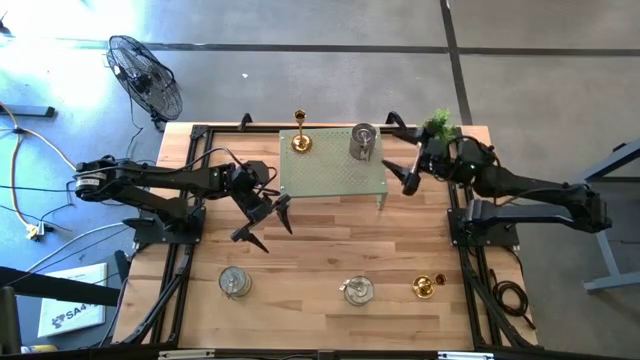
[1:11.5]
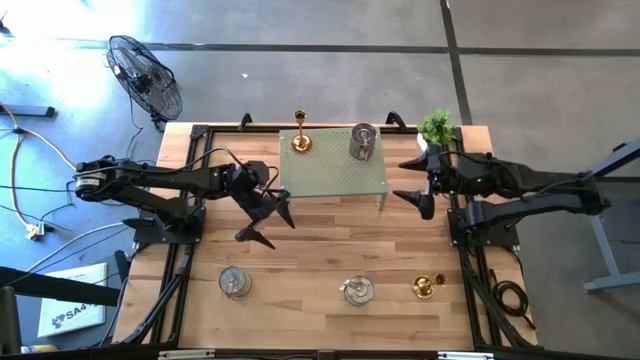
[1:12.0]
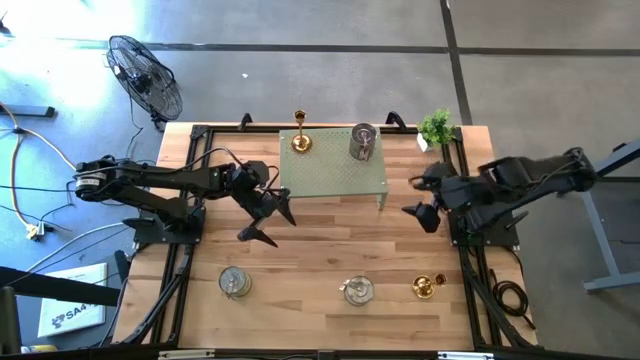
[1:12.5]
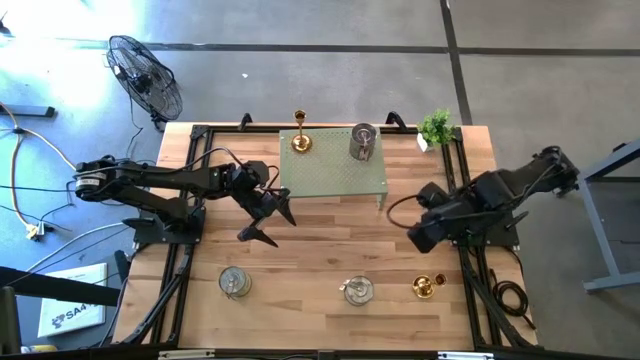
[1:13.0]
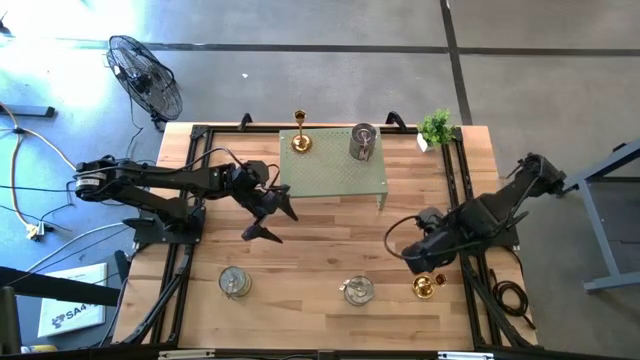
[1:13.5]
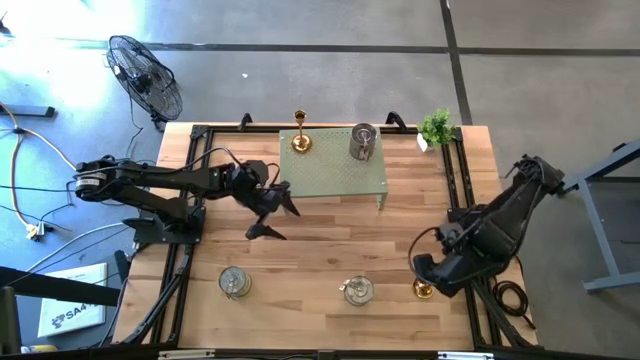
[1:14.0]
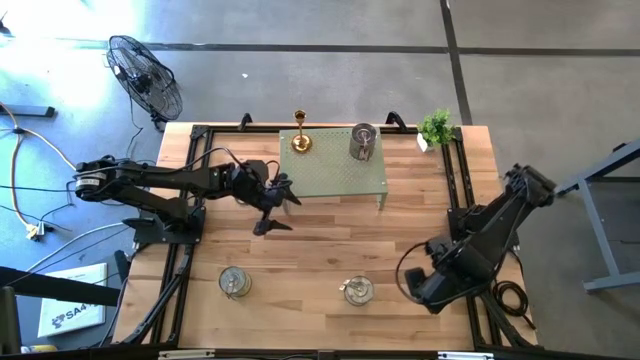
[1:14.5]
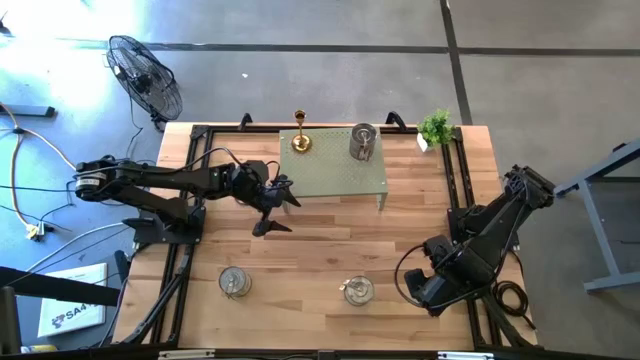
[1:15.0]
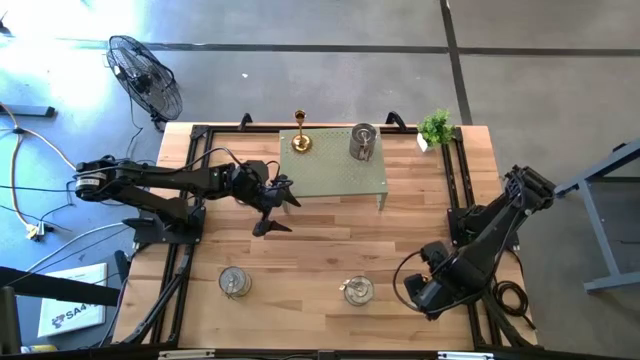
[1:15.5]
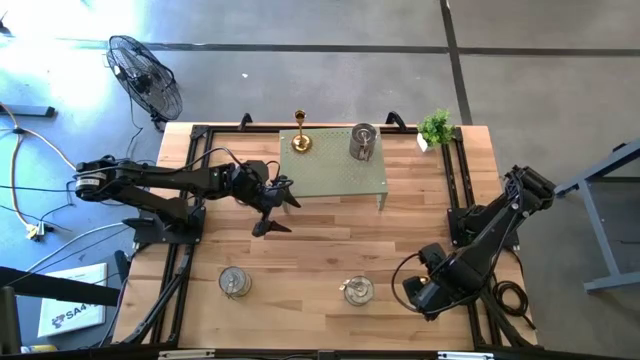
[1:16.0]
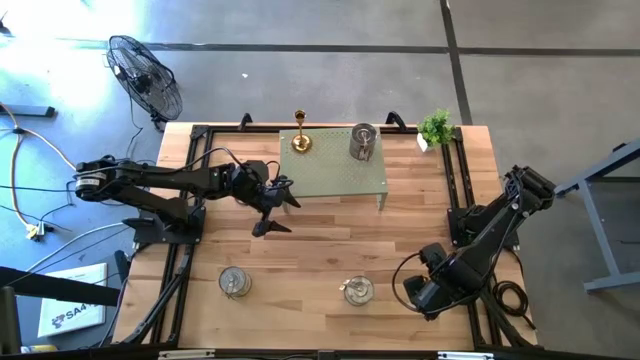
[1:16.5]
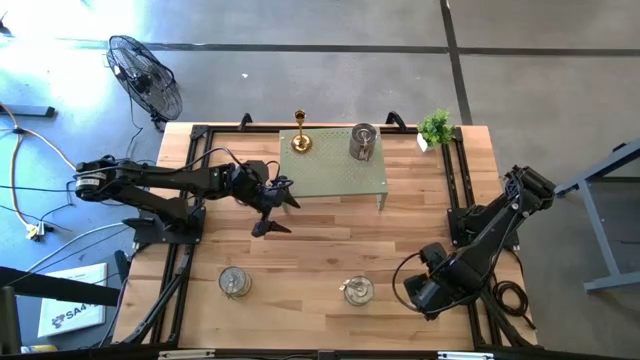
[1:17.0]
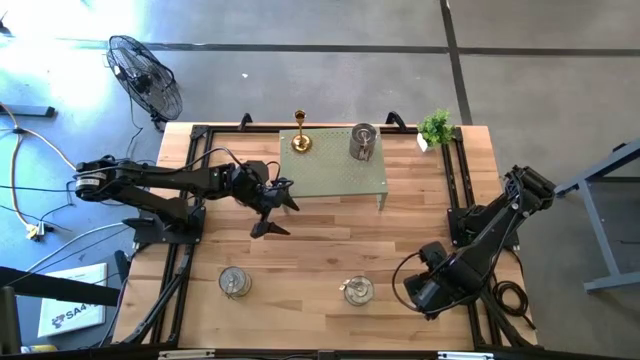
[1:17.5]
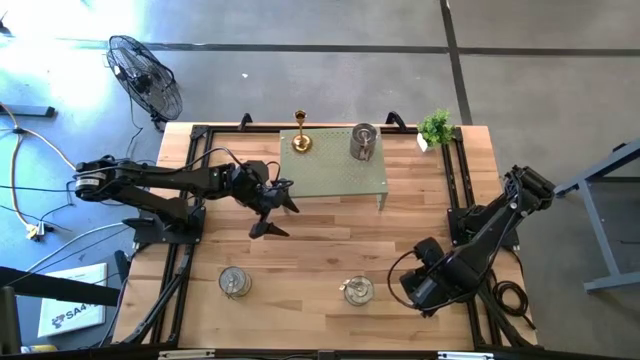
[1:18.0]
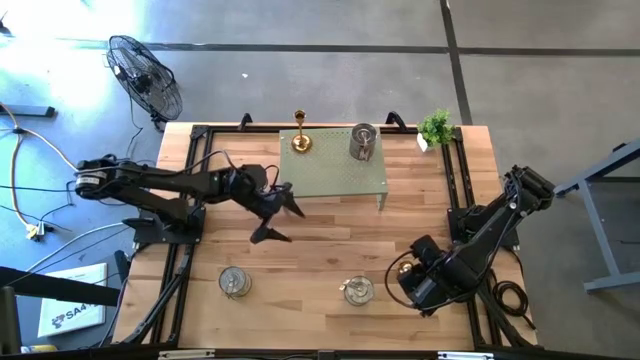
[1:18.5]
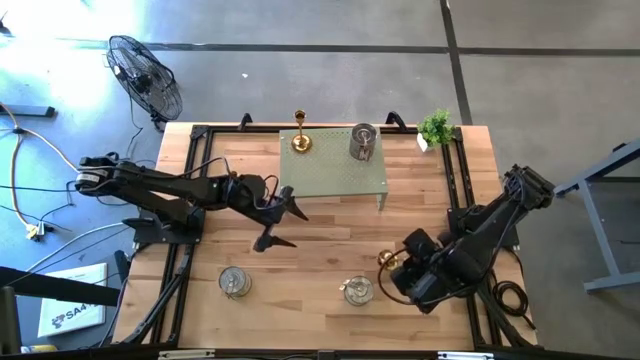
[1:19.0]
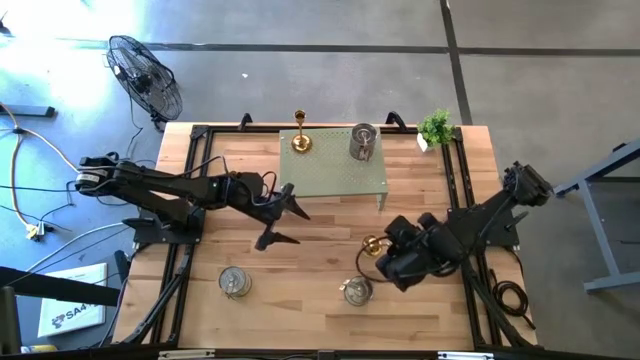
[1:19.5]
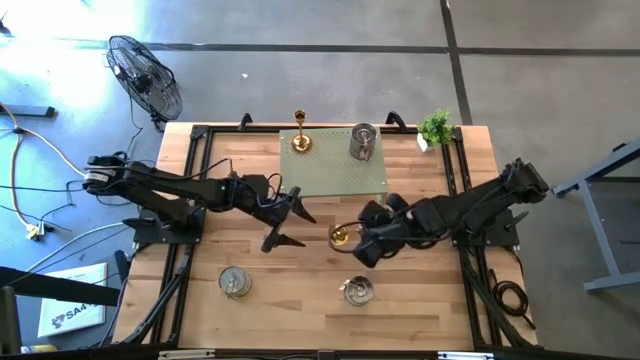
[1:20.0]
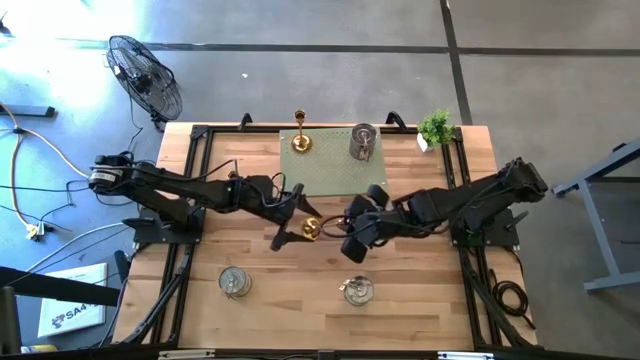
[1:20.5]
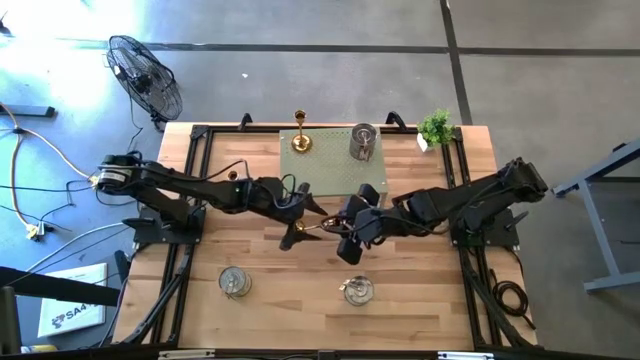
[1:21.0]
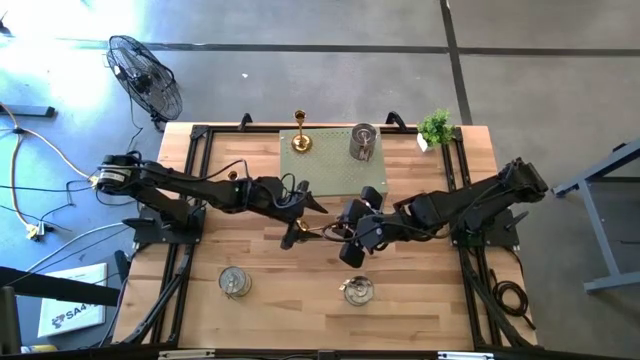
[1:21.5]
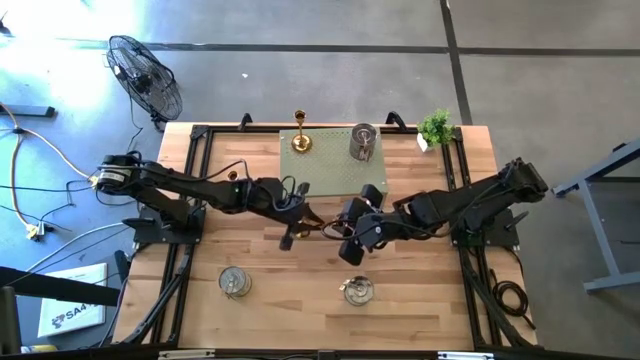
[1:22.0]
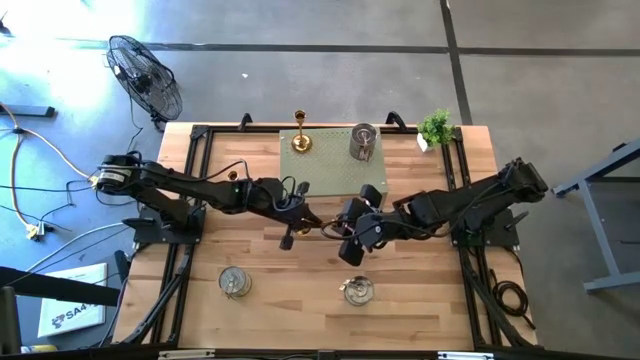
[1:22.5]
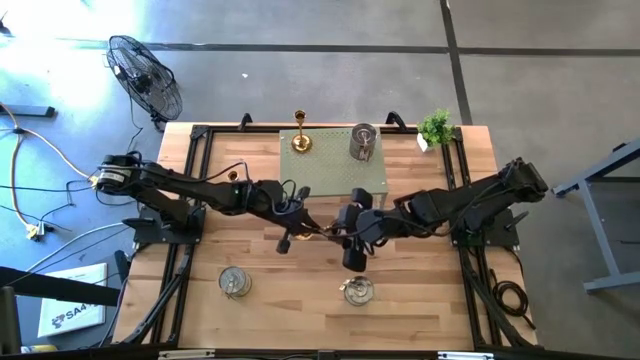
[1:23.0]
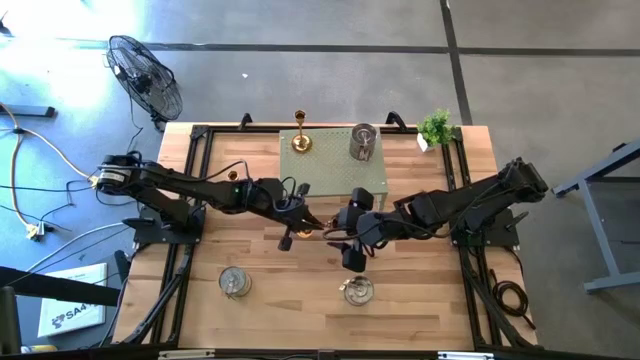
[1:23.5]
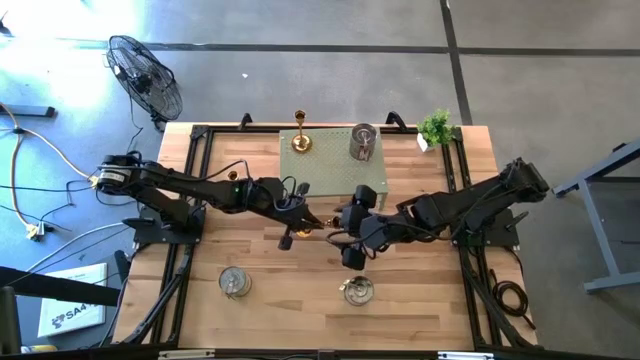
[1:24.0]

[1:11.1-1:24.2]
Task: Pick & Place candle stick holders
Put the bottom gold candle holder on the shelf

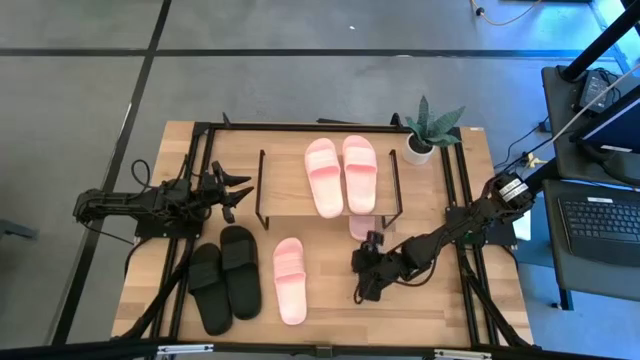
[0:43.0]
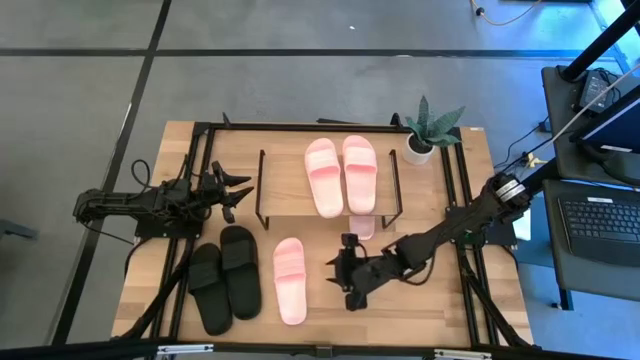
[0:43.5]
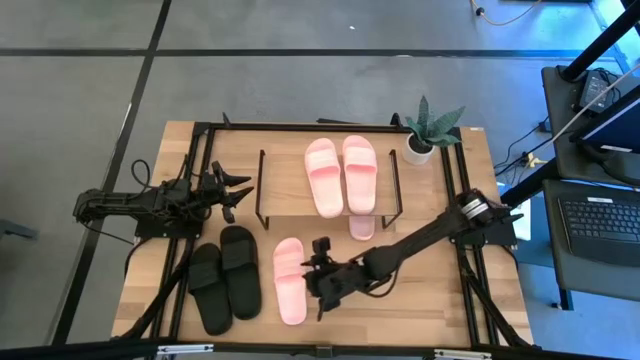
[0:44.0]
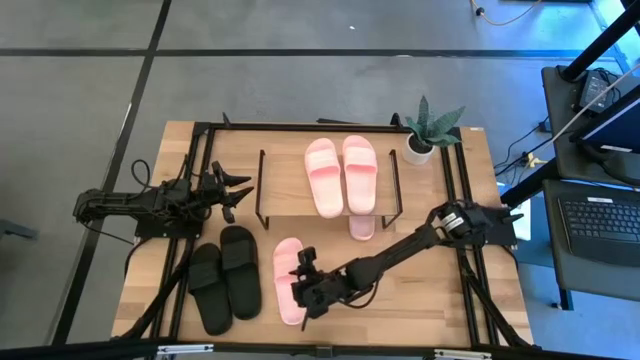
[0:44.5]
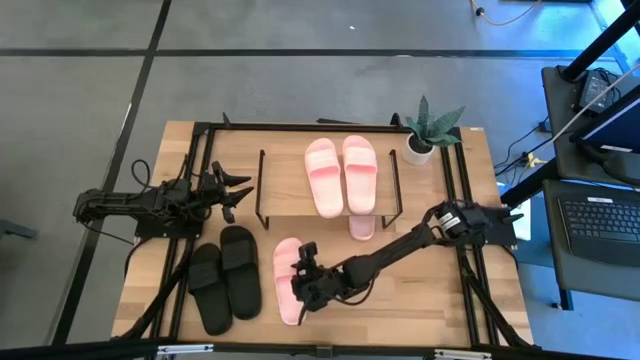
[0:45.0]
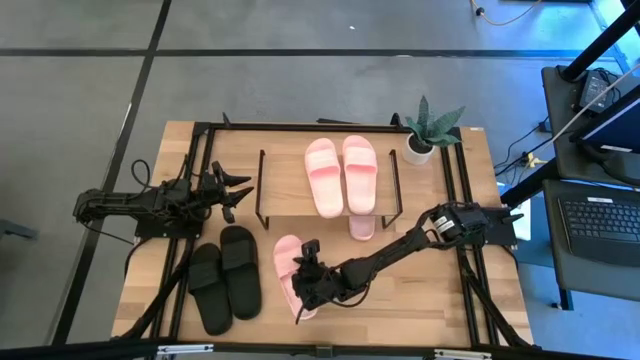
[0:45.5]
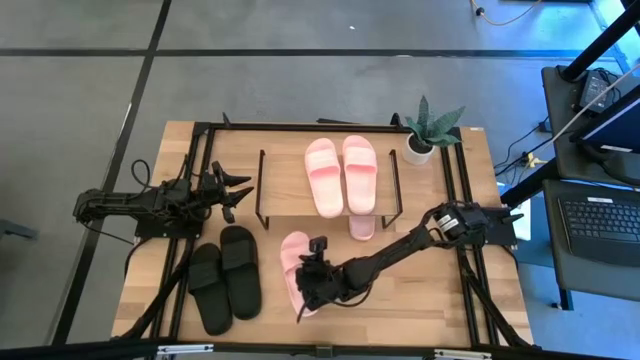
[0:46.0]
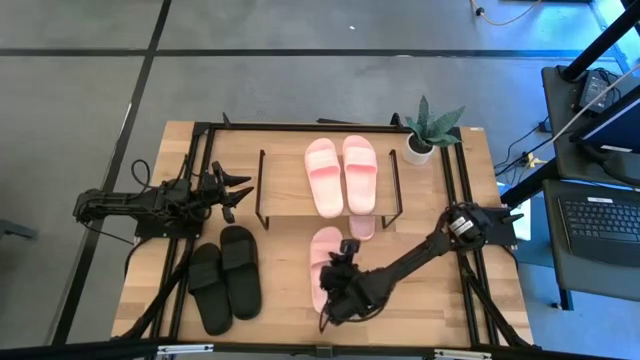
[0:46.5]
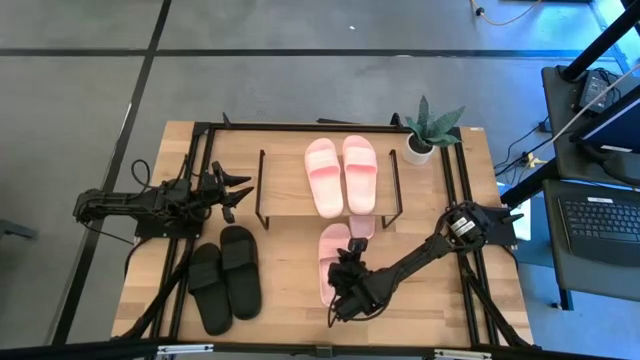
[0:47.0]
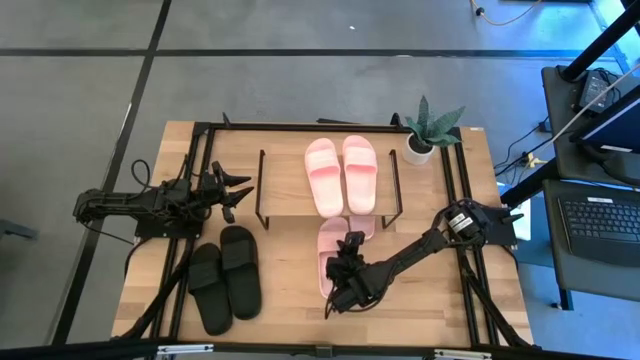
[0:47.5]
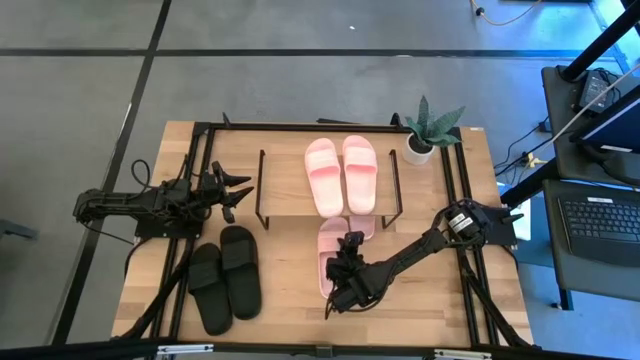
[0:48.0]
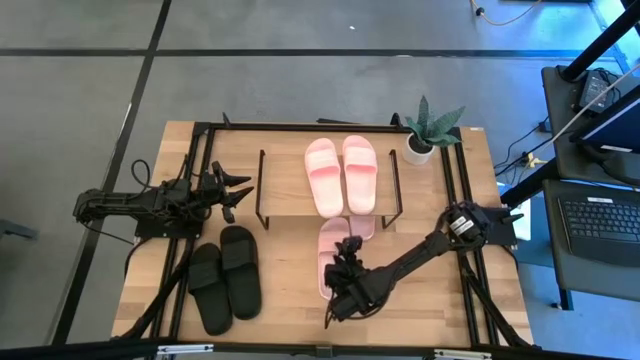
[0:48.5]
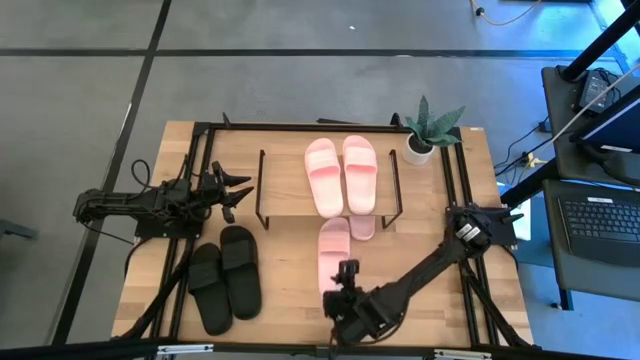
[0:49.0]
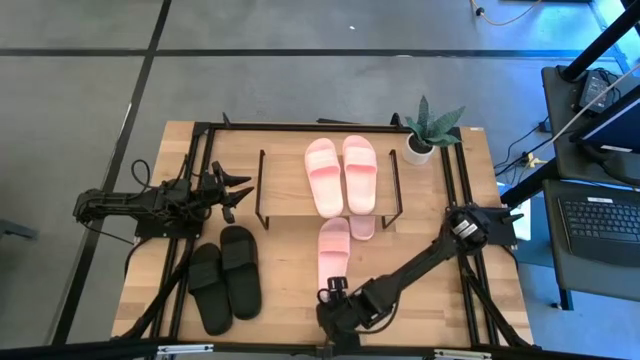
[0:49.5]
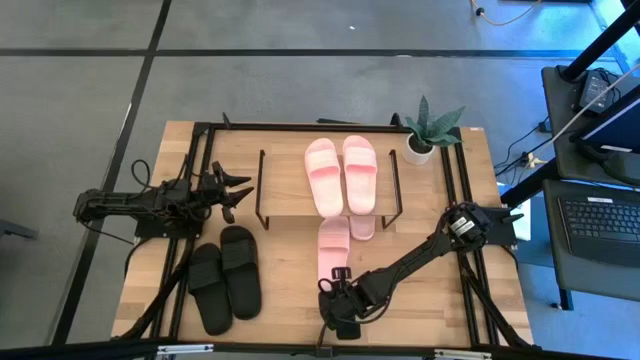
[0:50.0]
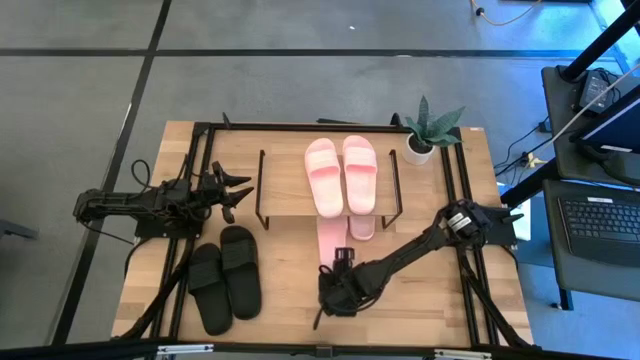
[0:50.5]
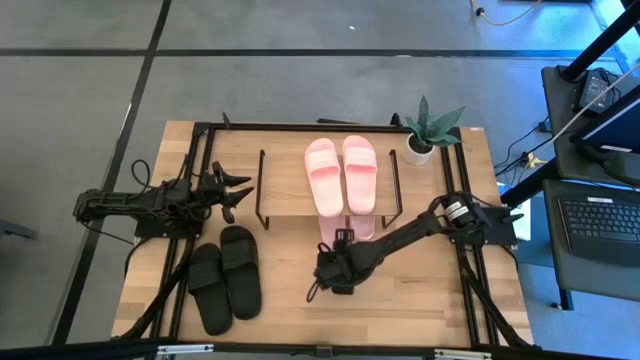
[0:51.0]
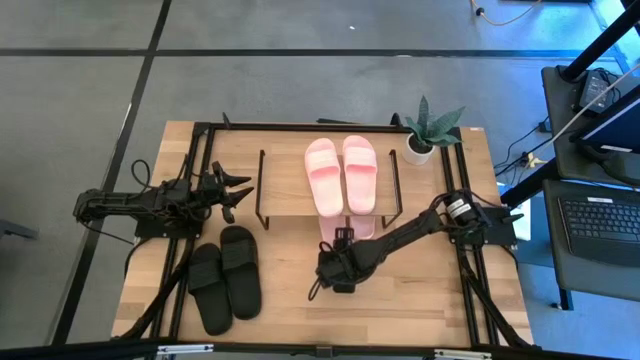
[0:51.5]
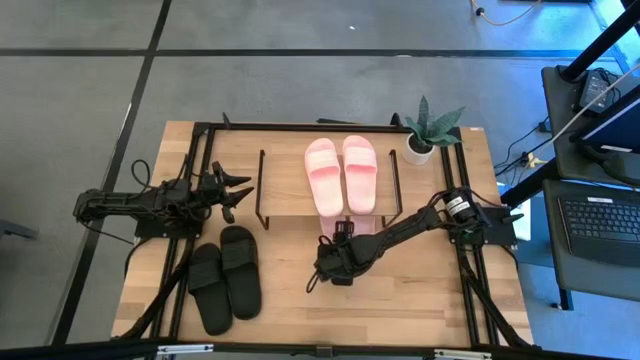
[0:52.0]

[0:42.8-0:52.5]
Task: Pick and place slides into the shelf
Move the pink slipper under the shelf
